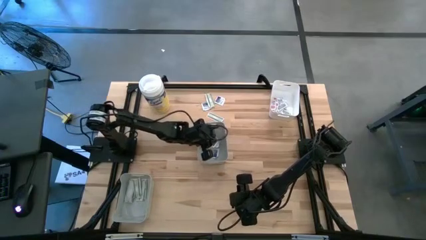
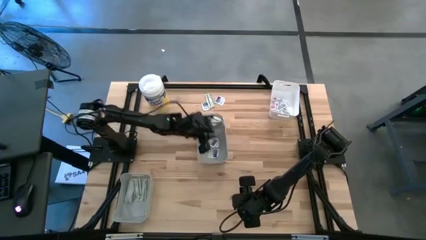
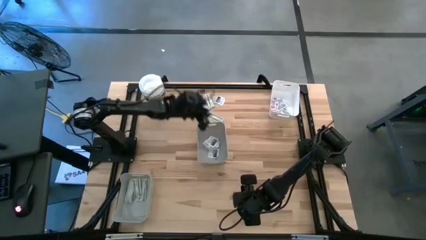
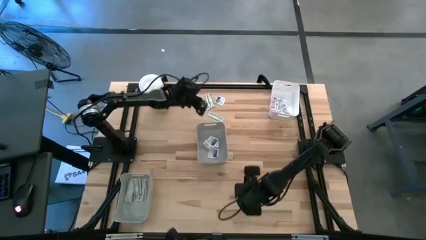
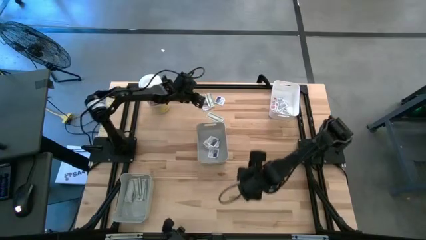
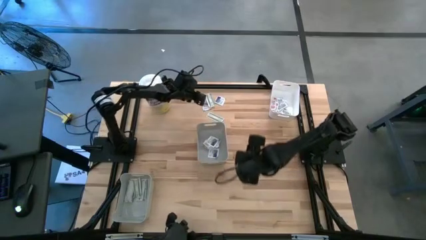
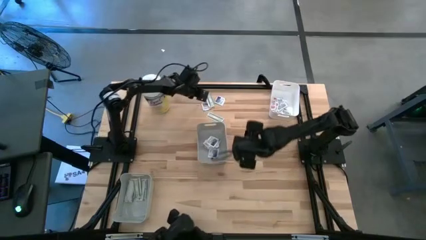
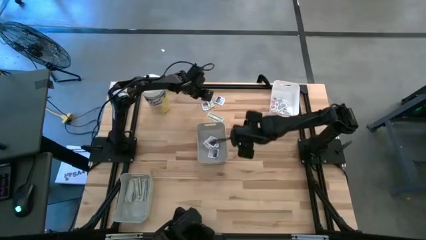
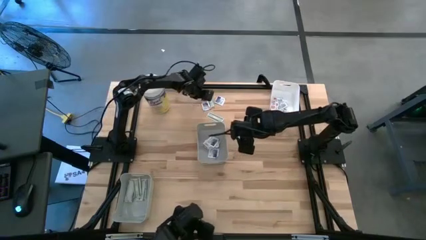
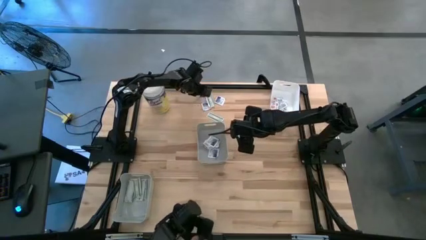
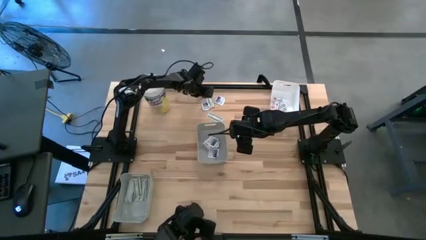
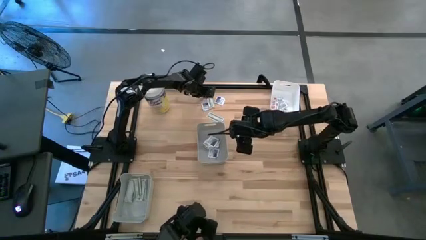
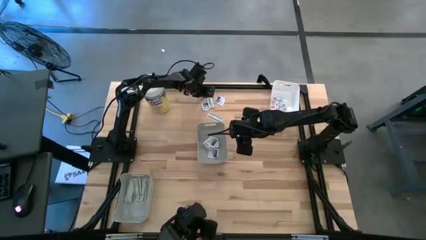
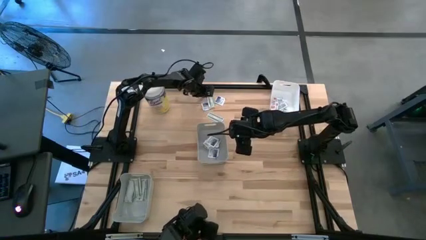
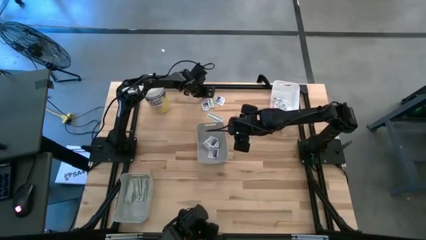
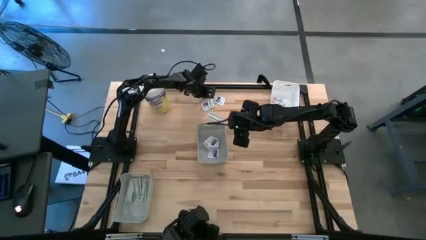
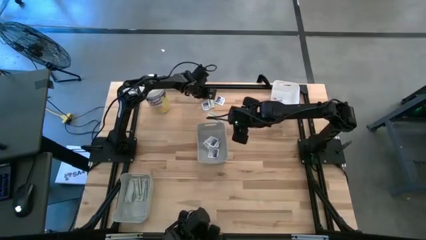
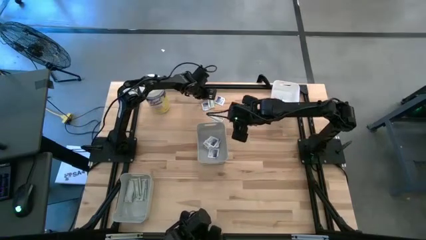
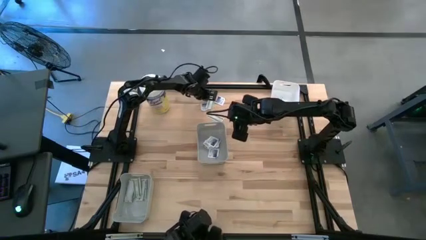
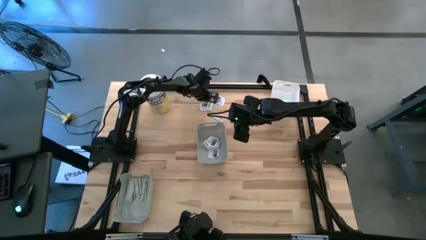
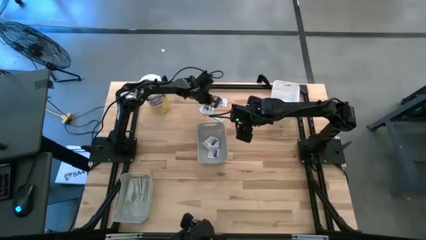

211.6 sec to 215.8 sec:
Task: Pick & Place First Aid Supplies
Put the green pad into the bottom gray bin

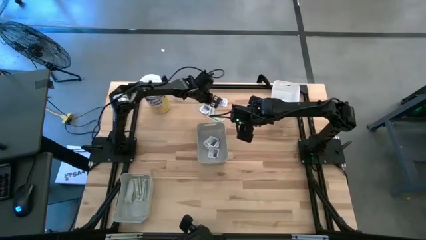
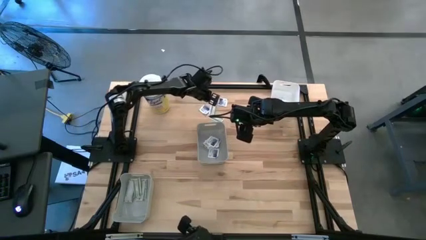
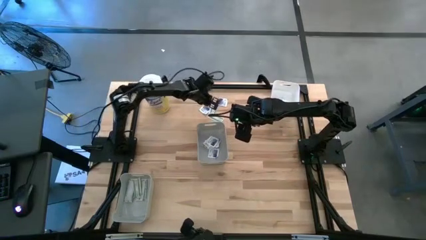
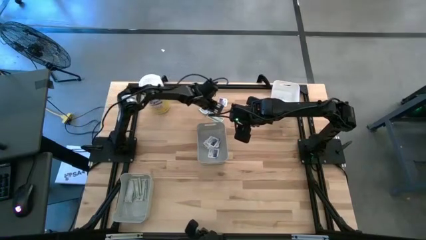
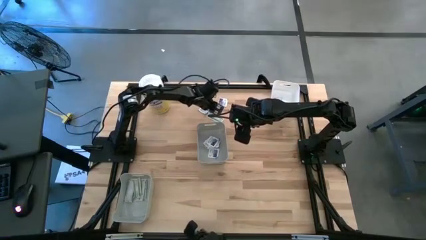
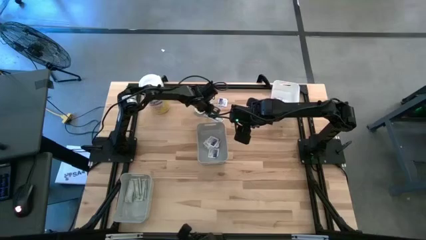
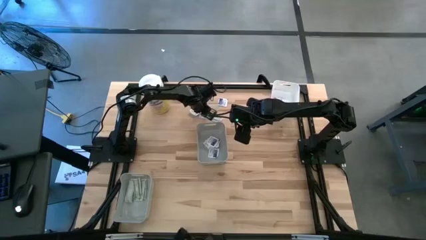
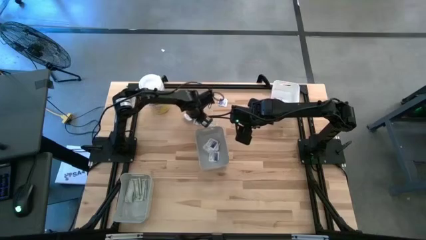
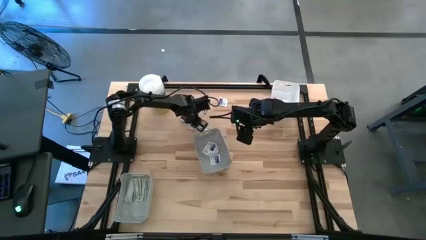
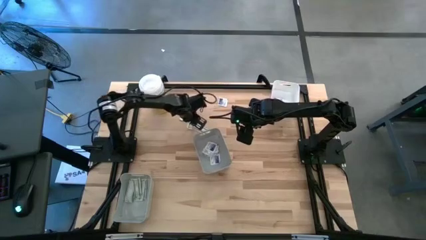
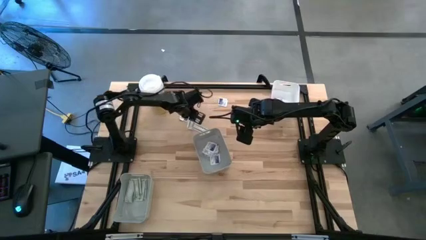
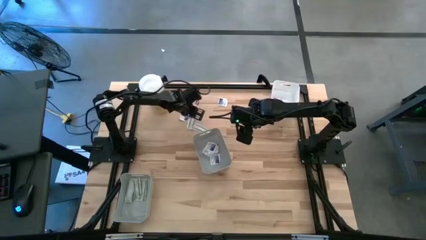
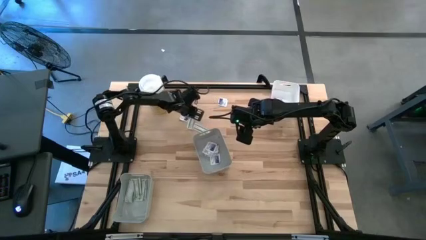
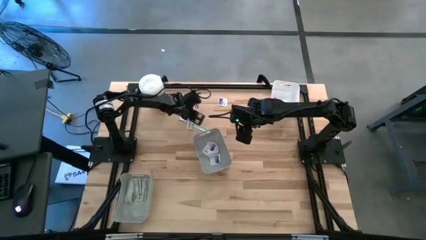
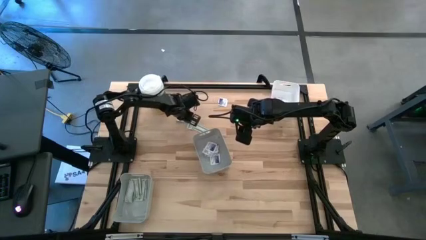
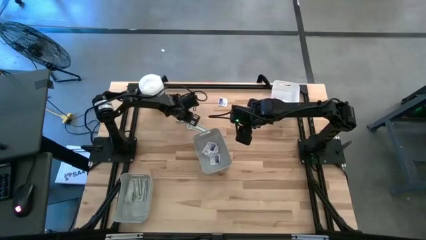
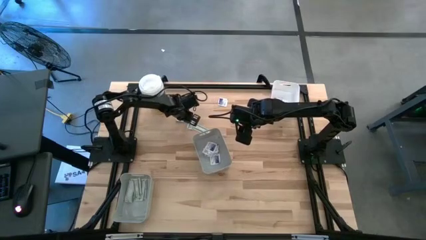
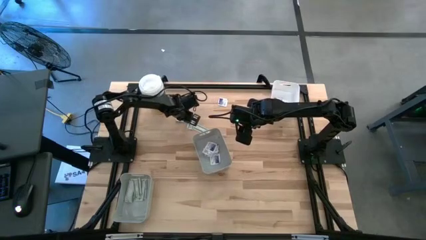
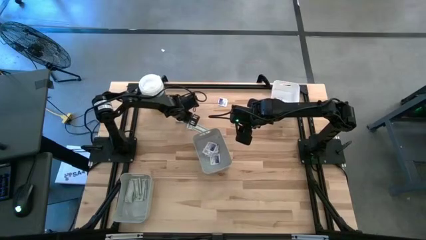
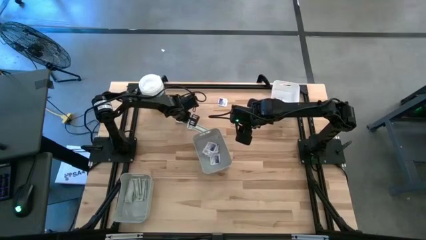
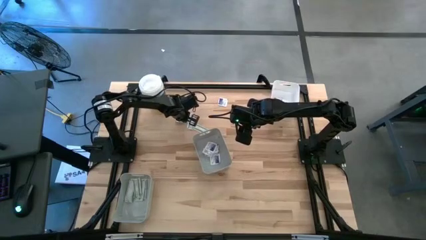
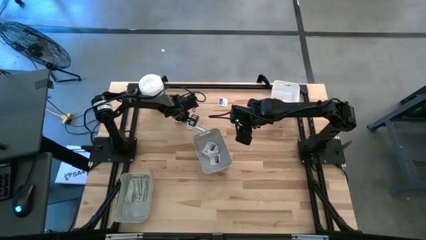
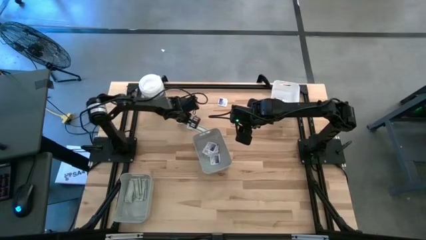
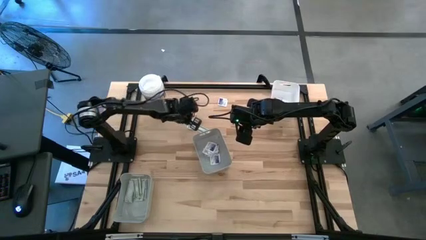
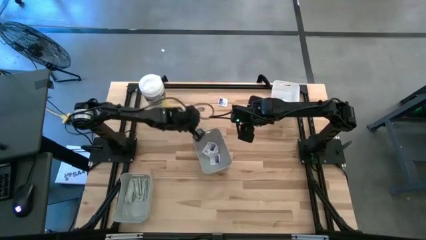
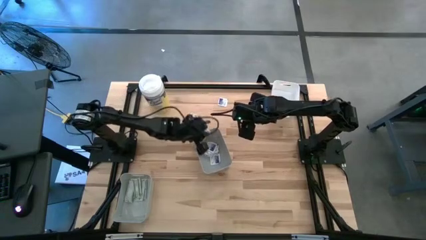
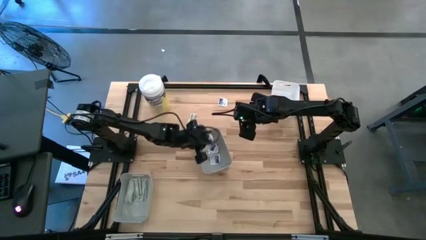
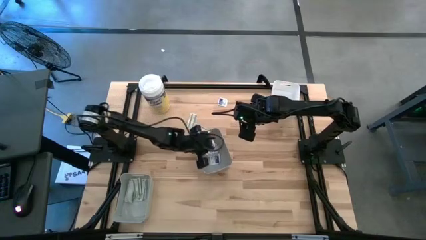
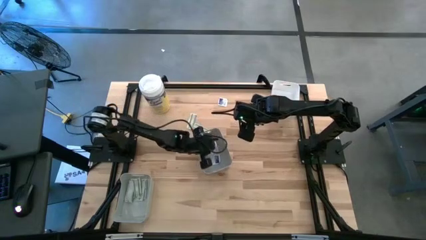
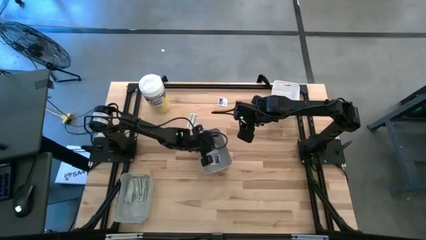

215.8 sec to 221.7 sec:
Put the blue pad into the middle gray bin

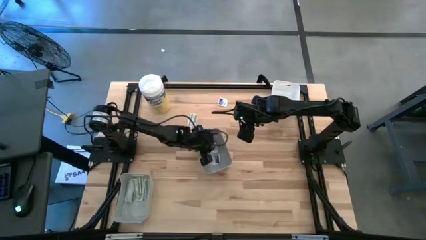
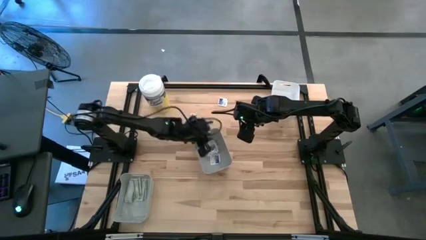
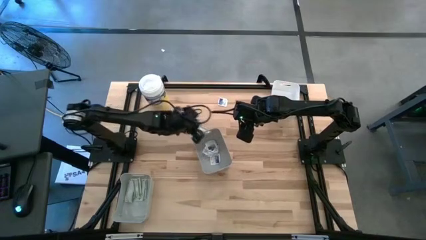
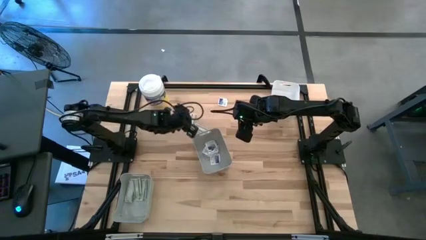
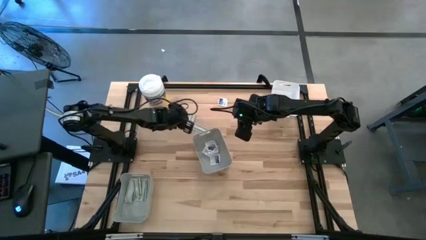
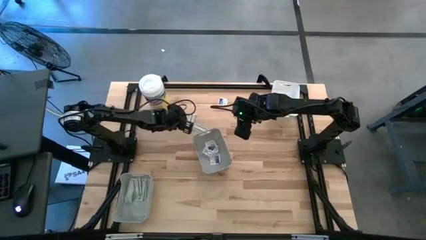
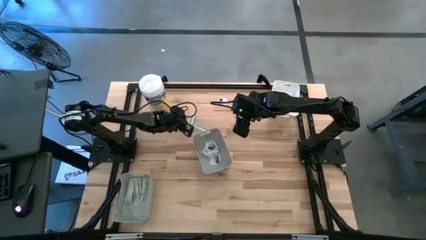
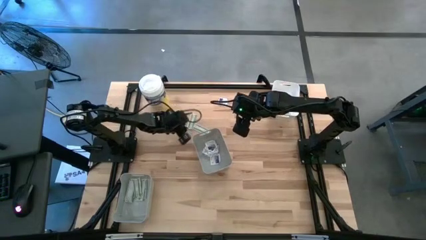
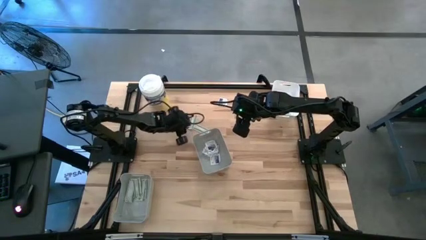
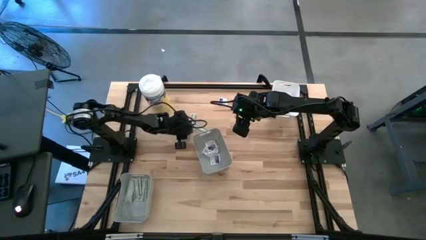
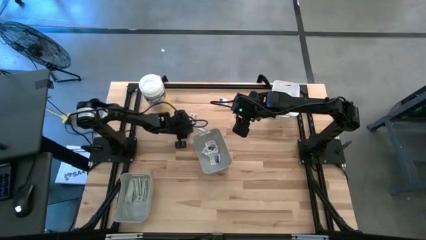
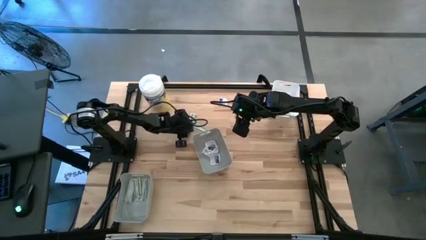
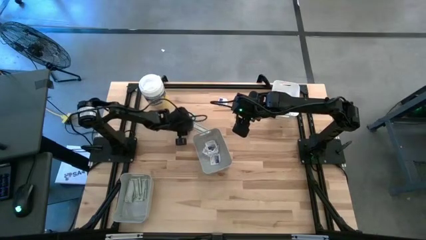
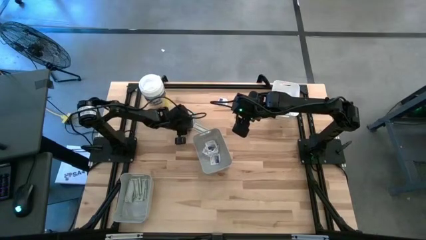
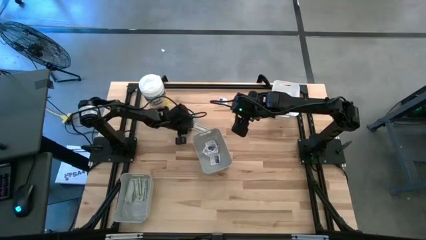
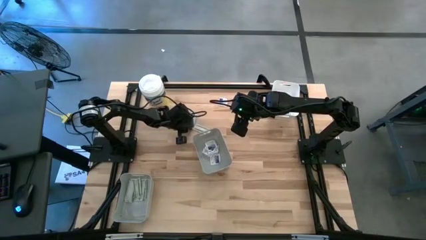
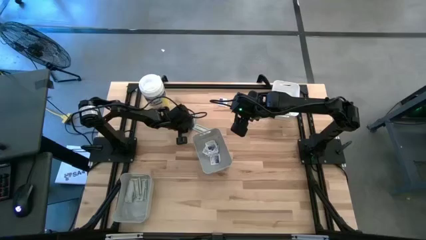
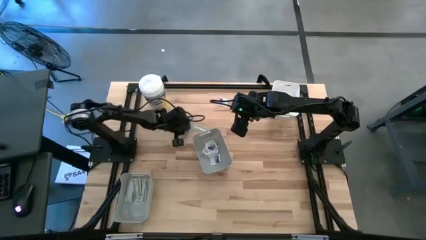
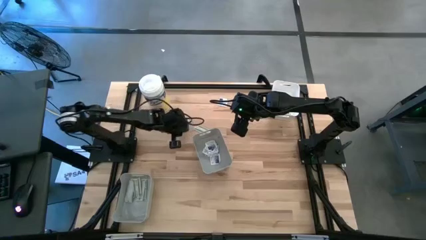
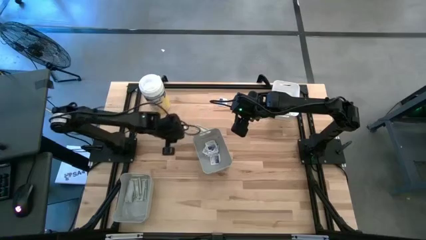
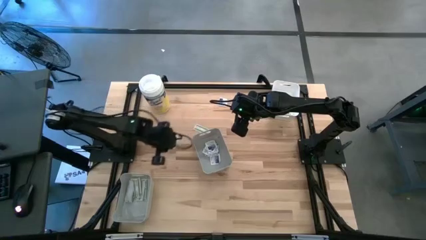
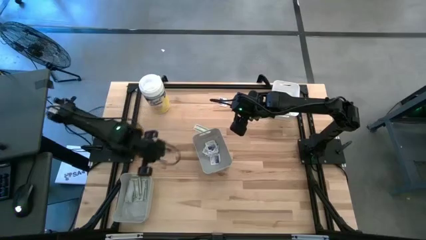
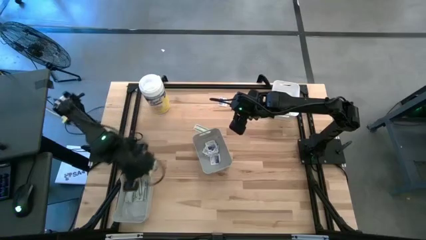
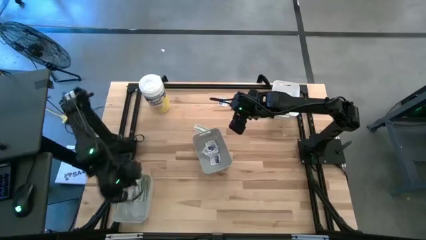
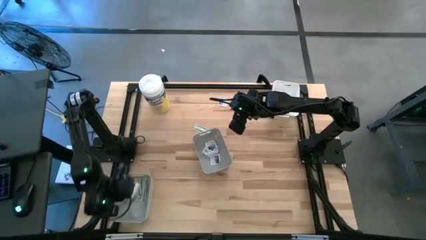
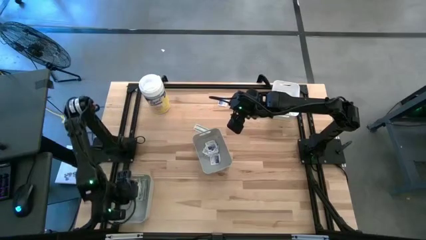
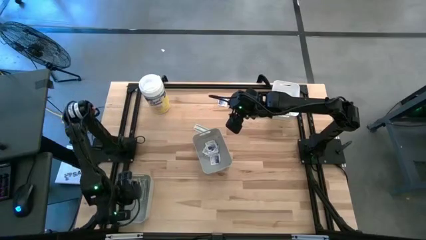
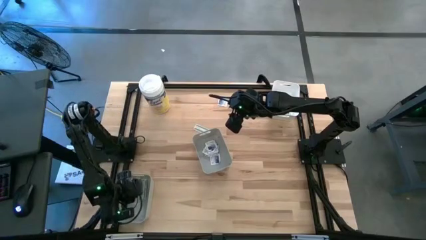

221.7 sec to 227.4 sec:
Put the green pad into the bottom gray bin

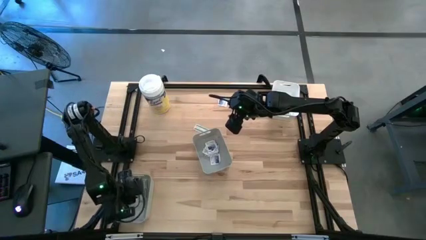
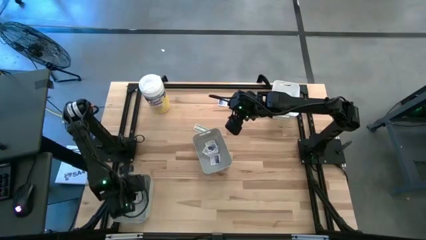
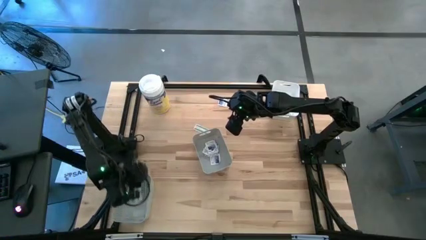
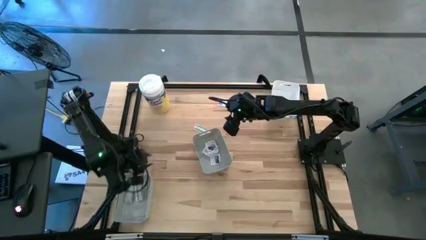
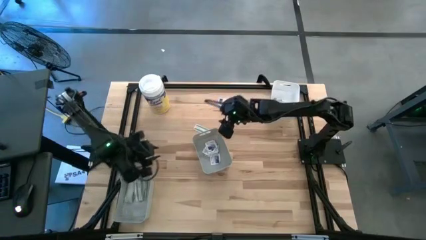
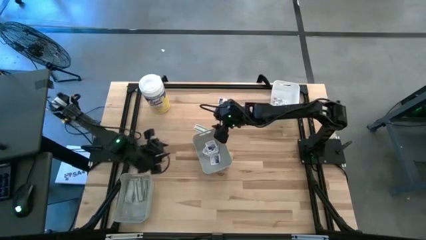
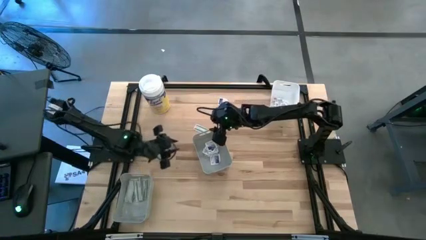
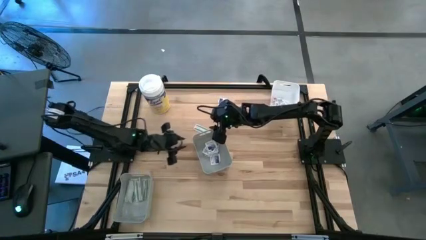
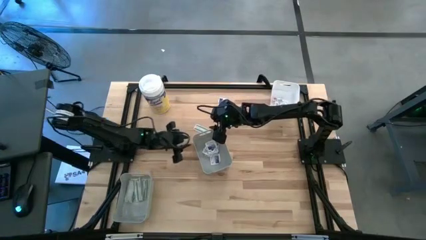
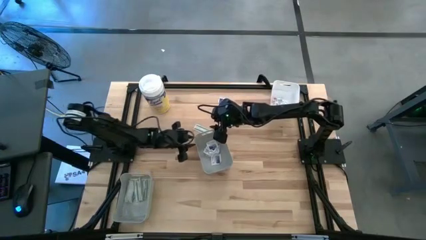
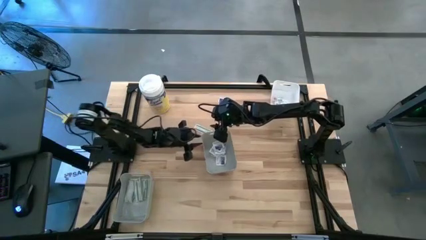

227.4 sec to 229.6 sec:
Adjust the middle gray bin
